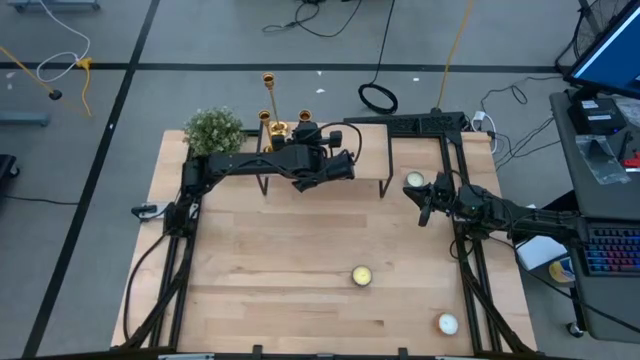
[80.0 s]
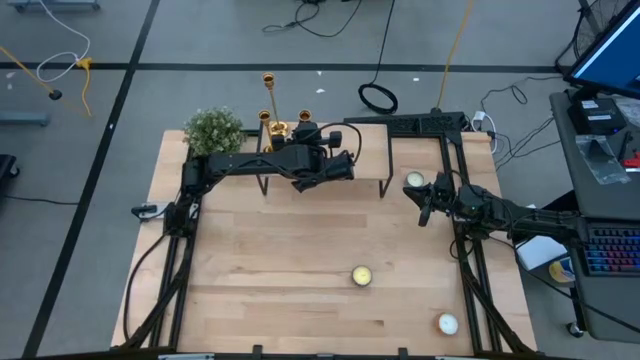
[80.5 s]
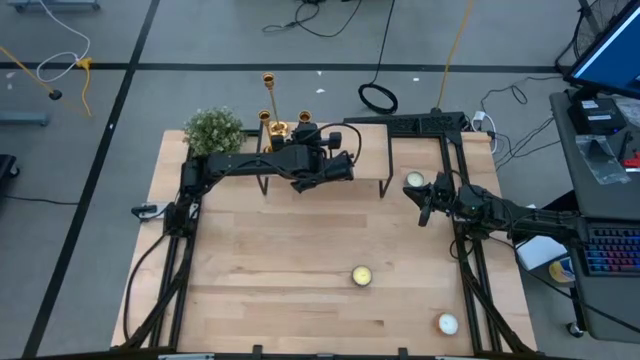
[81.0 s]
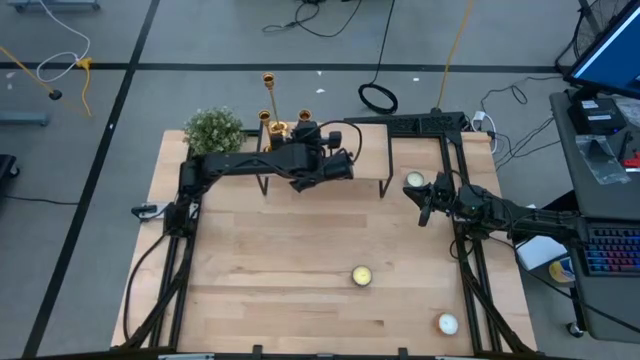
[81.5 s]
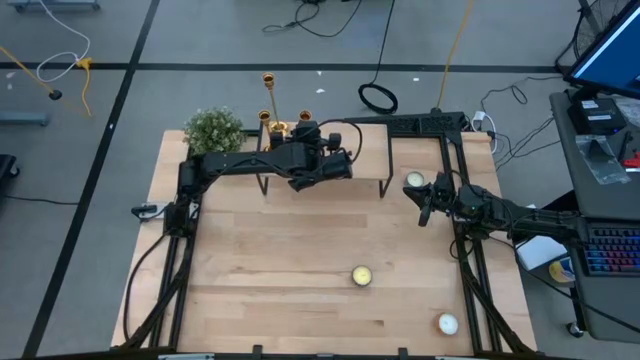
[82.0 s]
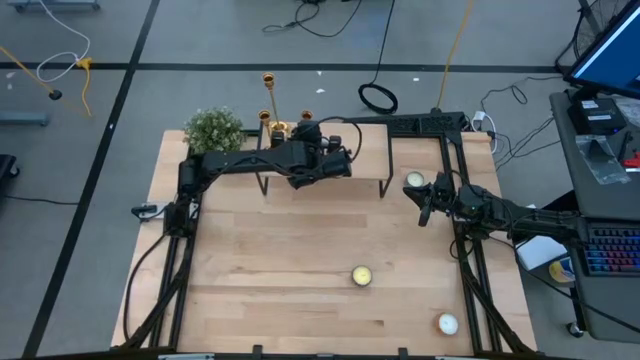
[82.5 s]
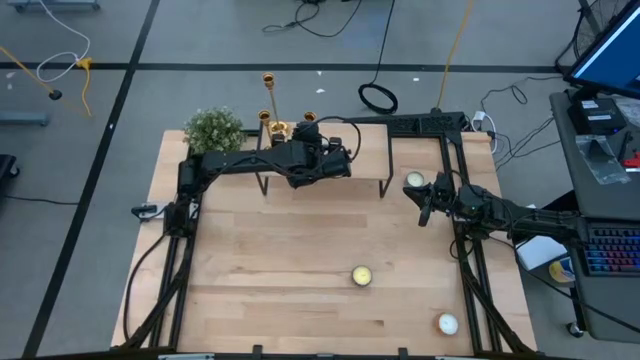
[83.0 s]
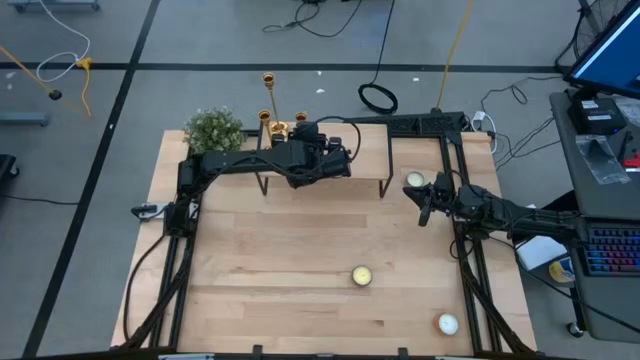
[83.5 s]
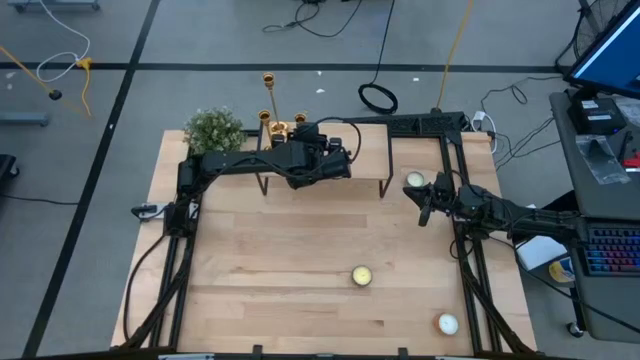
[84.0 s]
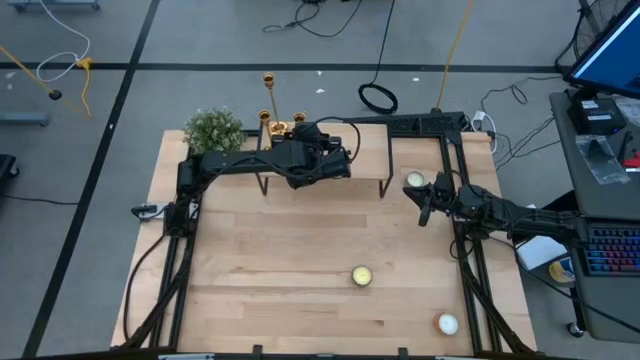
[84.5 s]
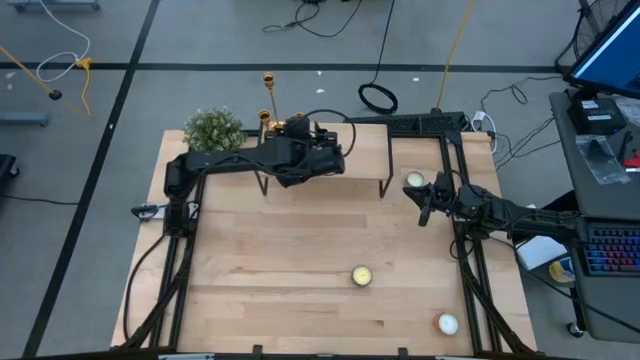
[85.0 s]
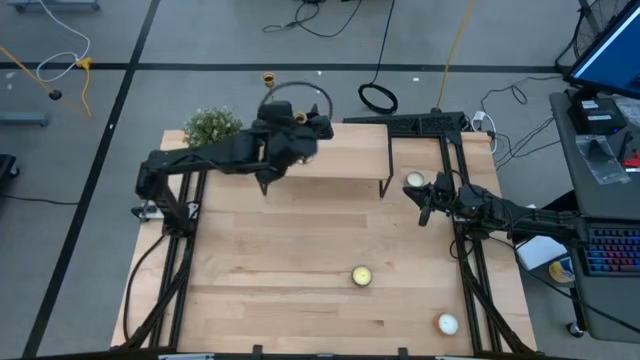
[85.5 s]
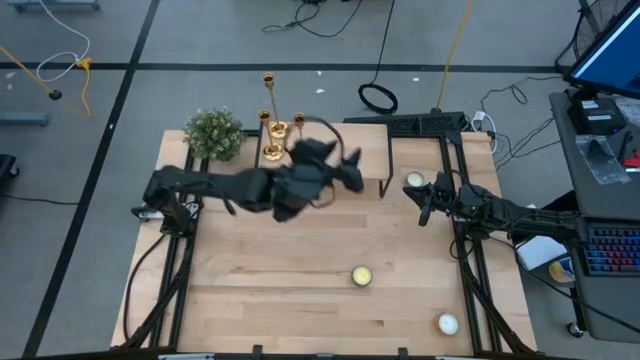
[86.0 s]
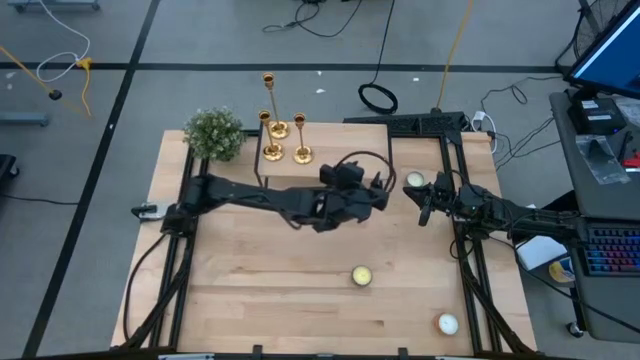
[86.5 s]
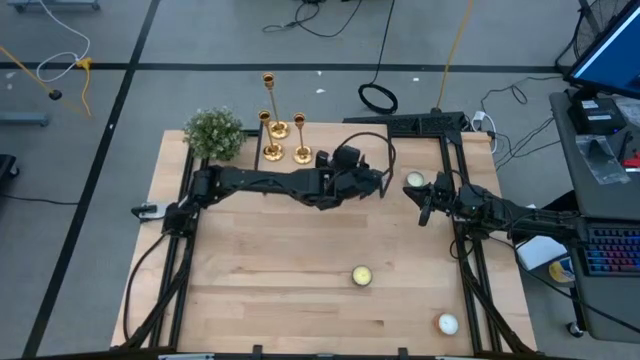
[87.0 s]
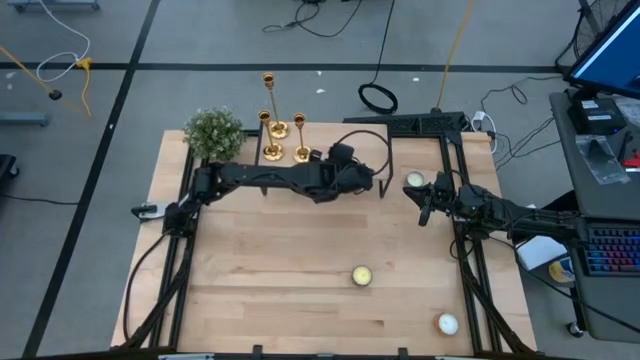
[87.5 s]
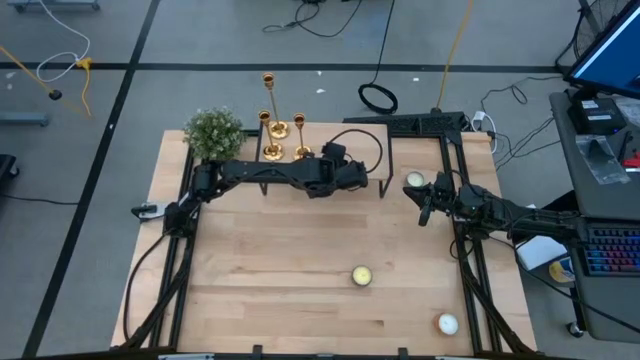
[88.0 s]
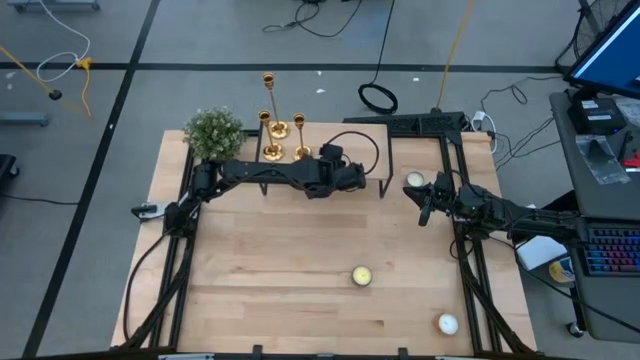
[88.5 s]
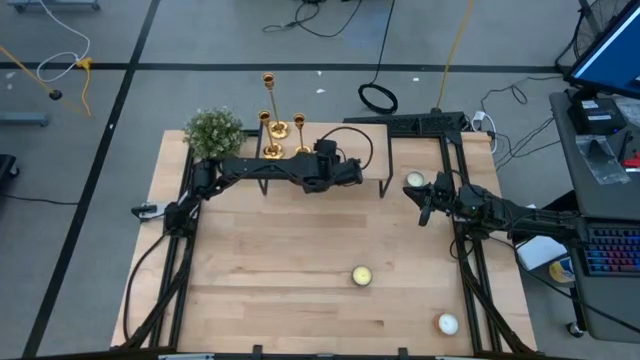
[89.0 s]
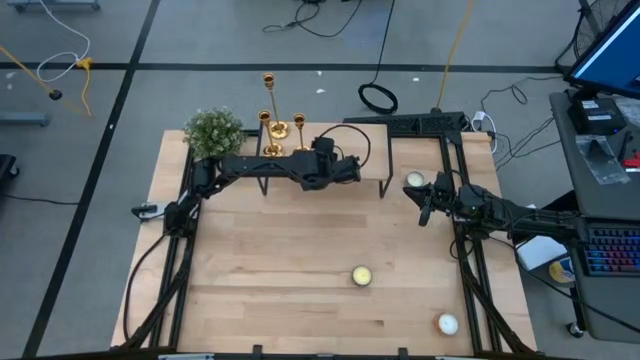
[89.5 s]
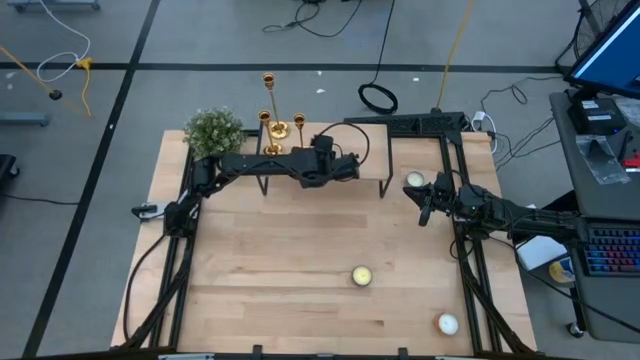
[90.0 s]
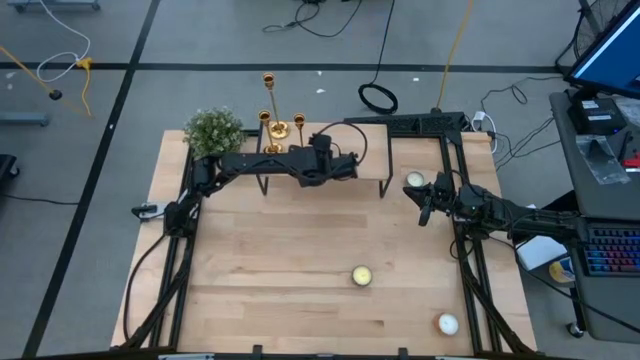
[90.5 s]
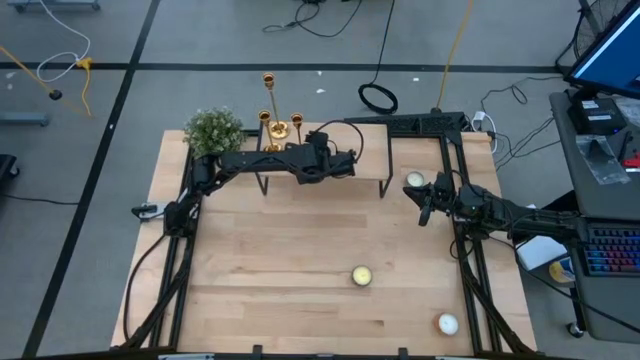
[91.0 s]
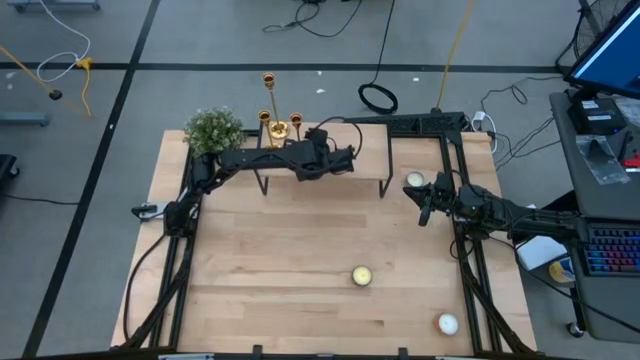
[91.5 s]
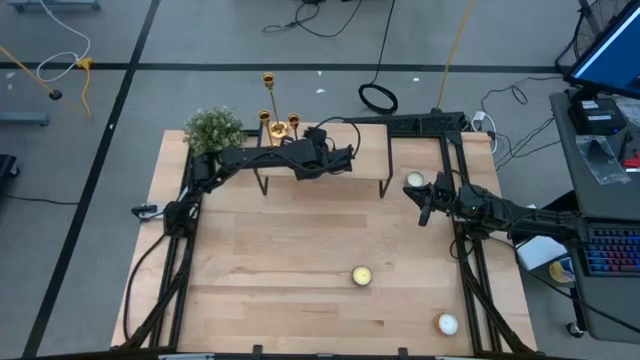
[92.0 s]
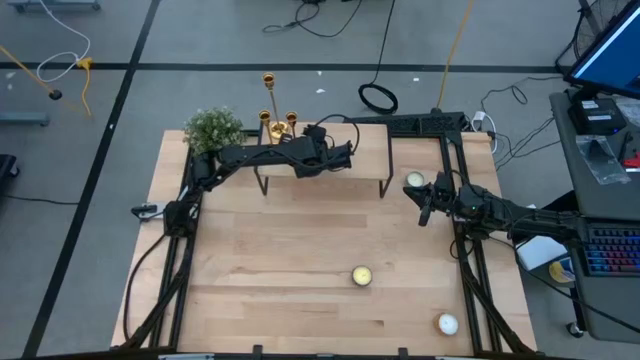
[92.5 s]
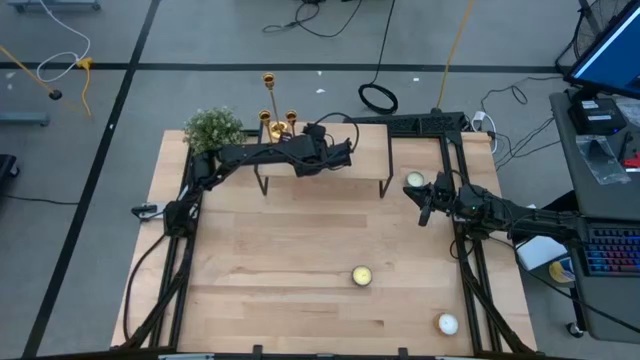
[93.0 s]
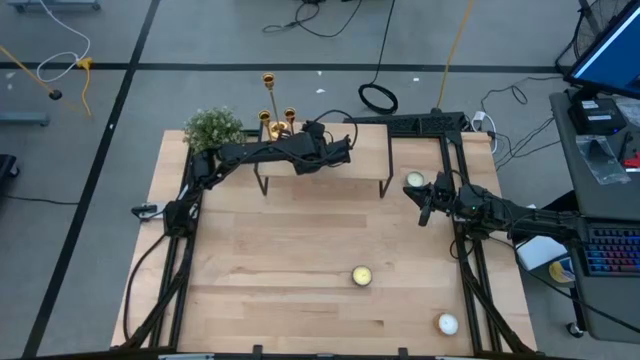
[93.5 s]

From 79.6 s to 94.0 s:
Task: Pick & Place candle stick holders
Put the gold candle holder on the shelf
